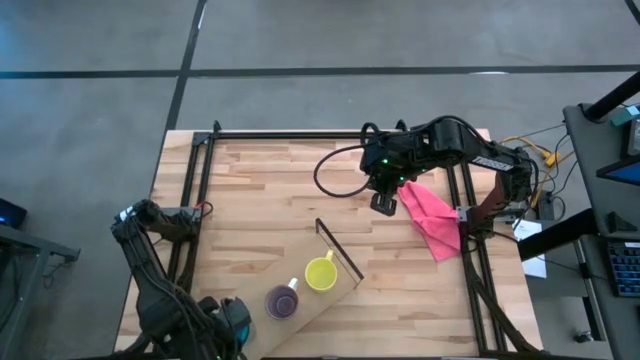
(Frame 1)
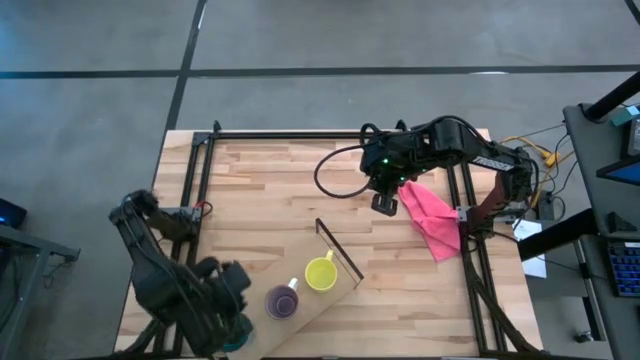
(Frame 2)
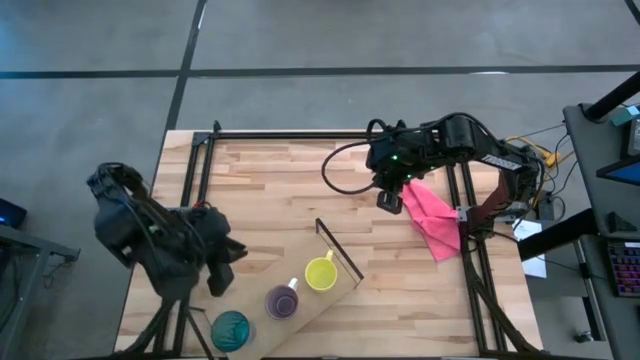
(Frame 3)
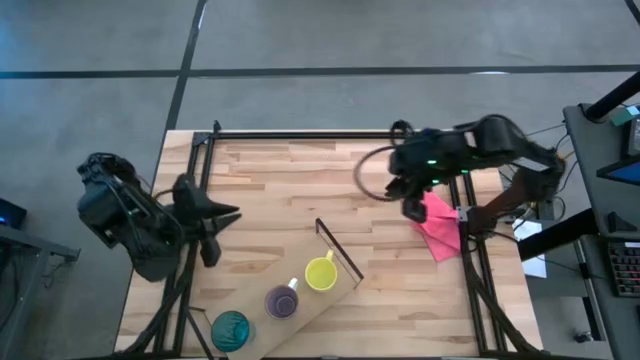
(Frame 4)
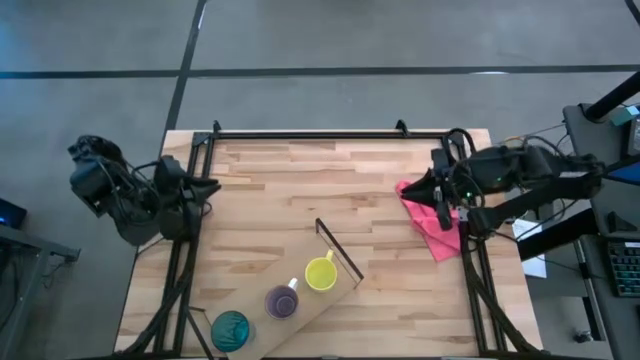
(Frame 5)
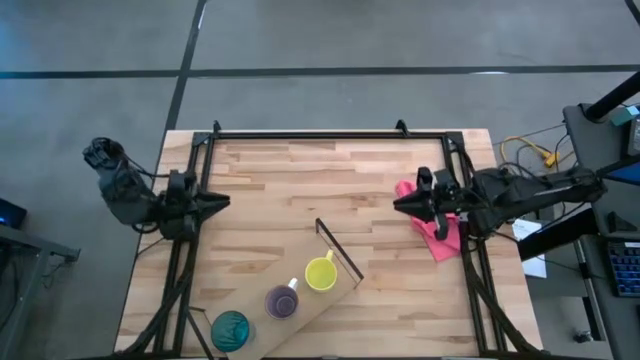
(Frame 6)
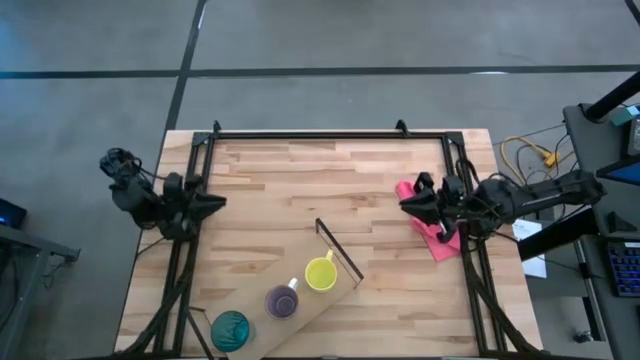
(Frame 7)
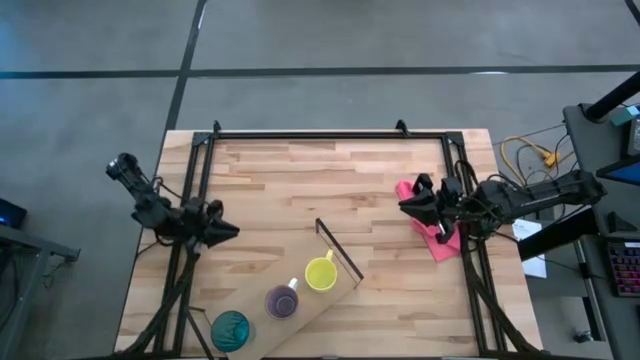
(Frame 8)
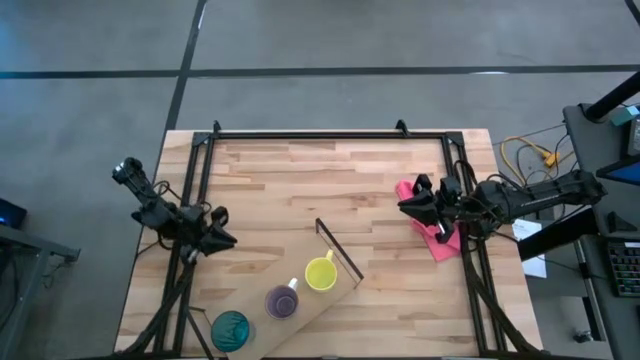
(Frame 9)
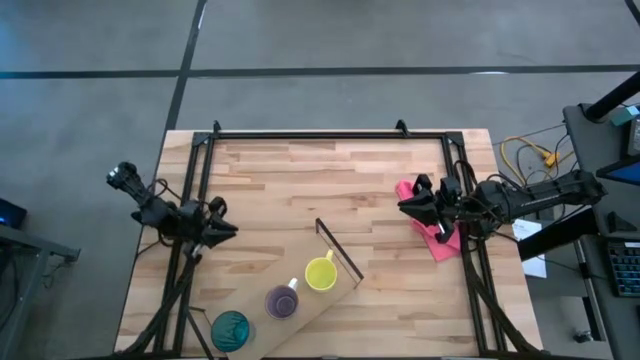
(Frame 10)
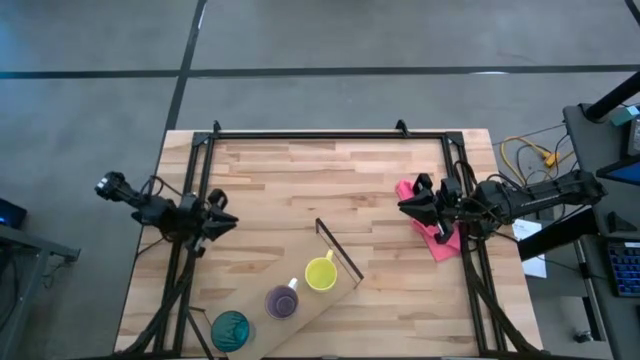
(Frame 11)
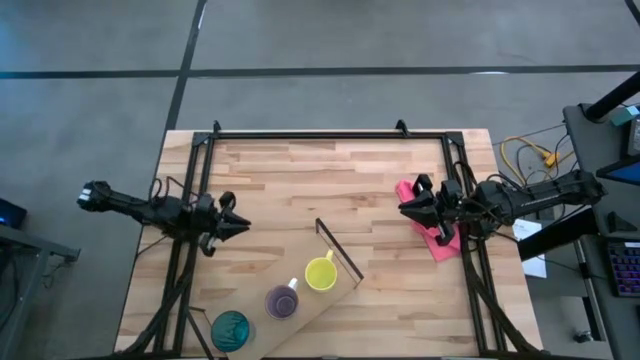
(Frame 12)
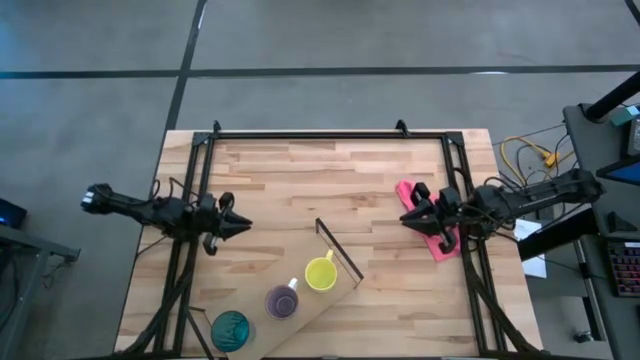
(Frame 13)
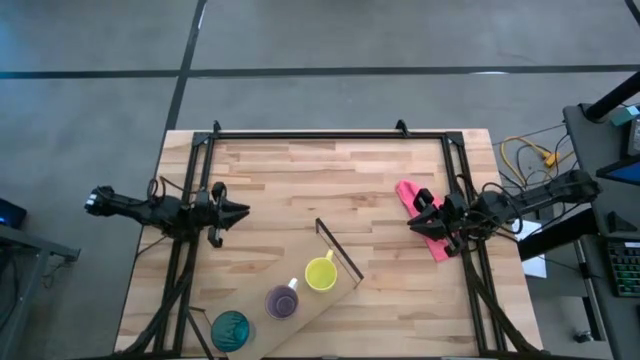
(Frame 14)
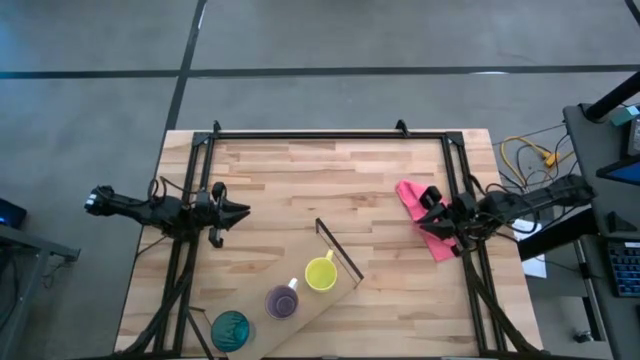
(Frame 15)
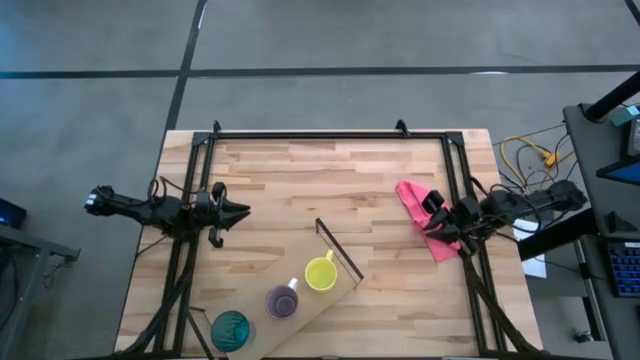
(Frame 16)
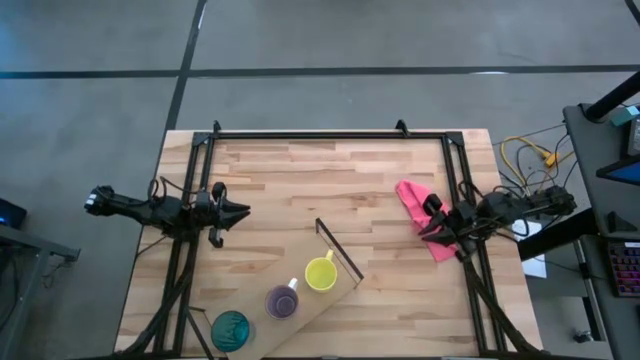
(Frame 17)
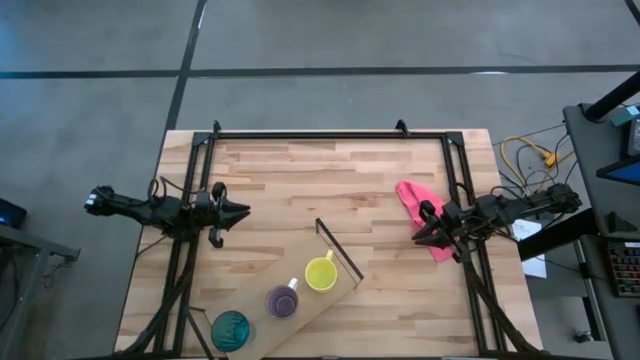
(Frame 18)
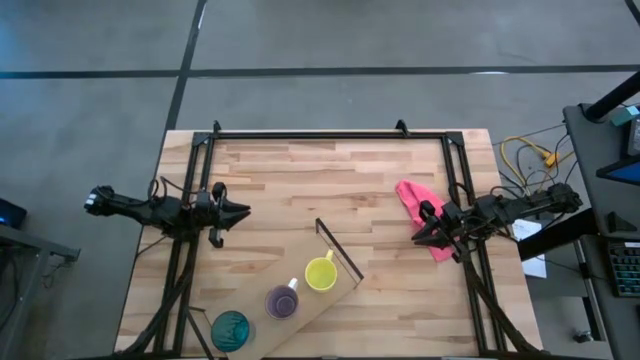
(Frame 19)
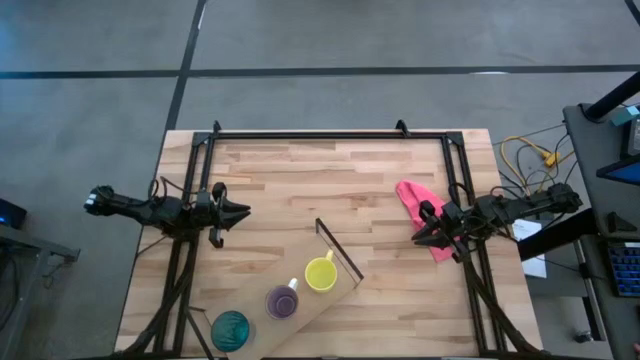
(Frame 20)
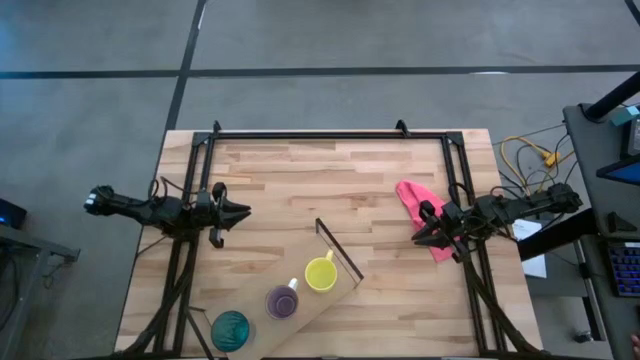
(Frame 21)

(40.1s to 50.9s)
Task: Stack small to large cups/mugs on shelf
Return to Home Position

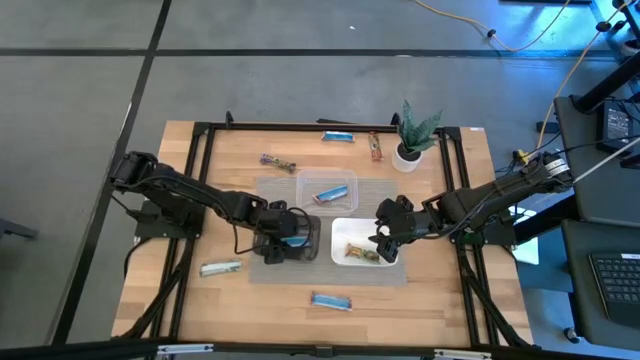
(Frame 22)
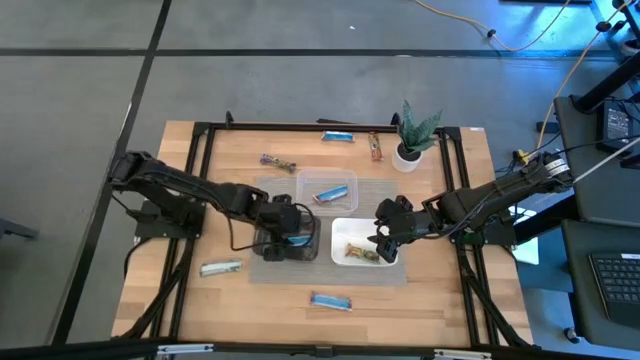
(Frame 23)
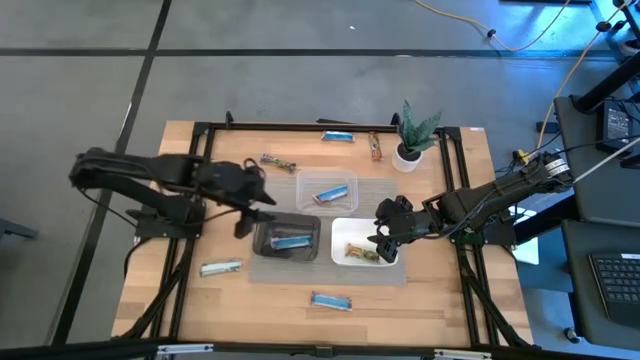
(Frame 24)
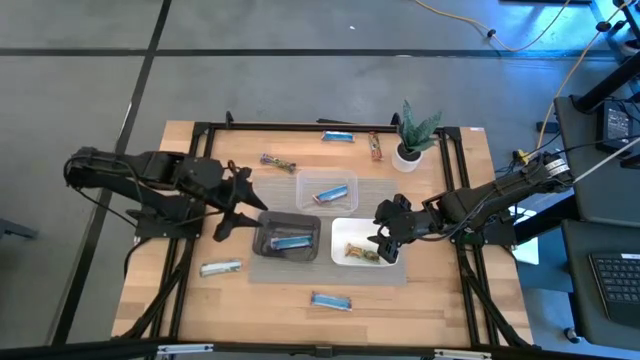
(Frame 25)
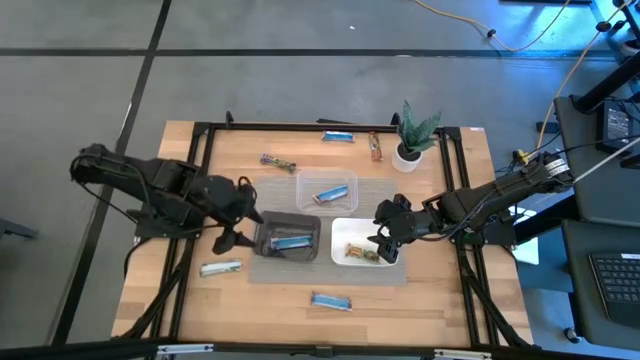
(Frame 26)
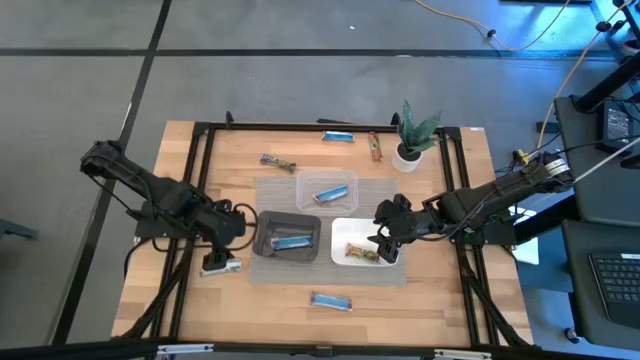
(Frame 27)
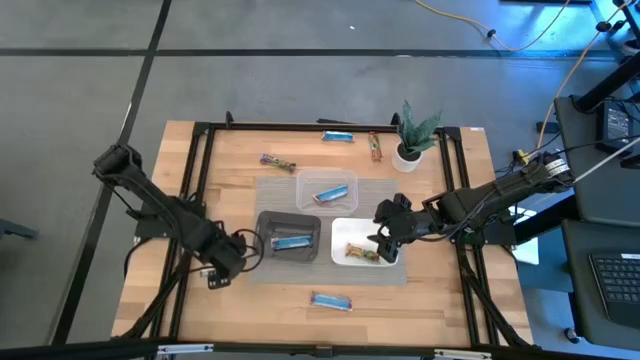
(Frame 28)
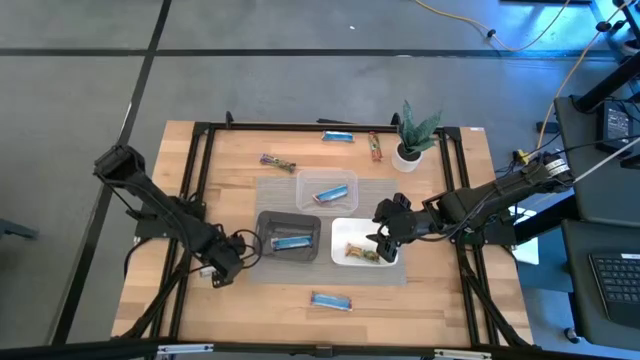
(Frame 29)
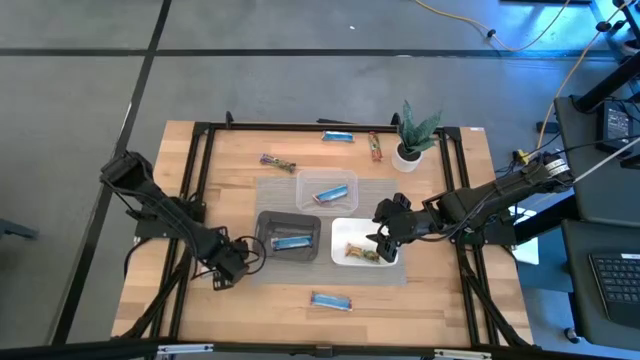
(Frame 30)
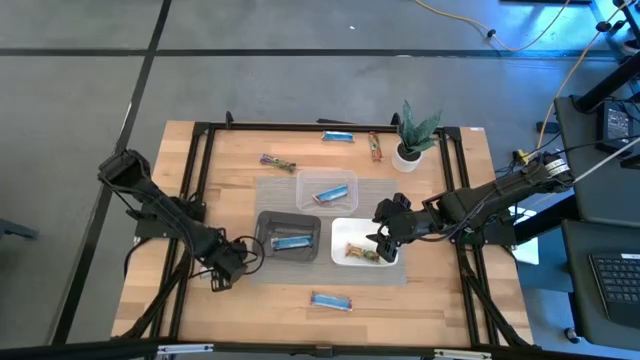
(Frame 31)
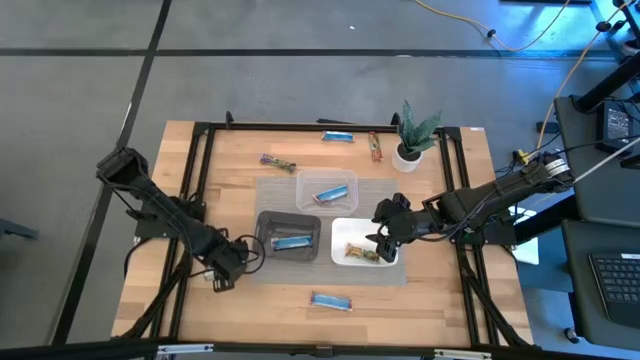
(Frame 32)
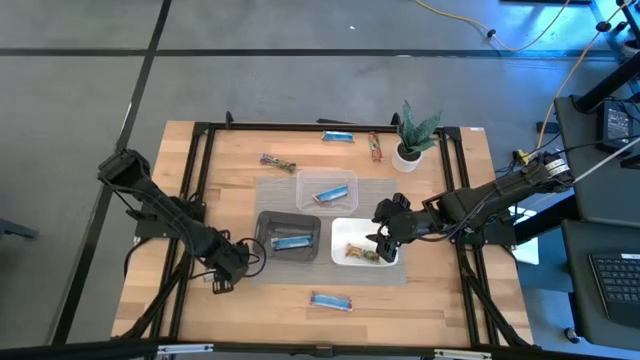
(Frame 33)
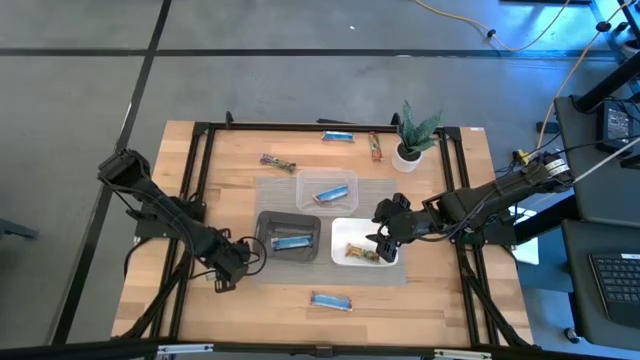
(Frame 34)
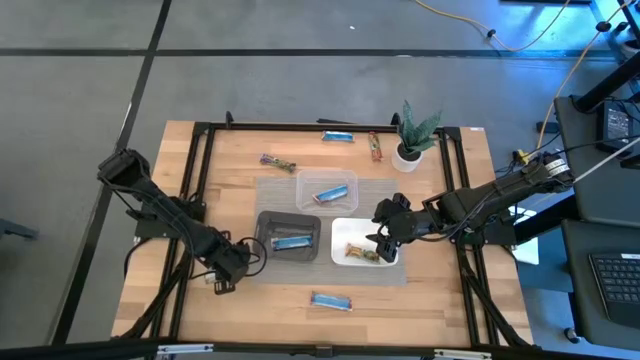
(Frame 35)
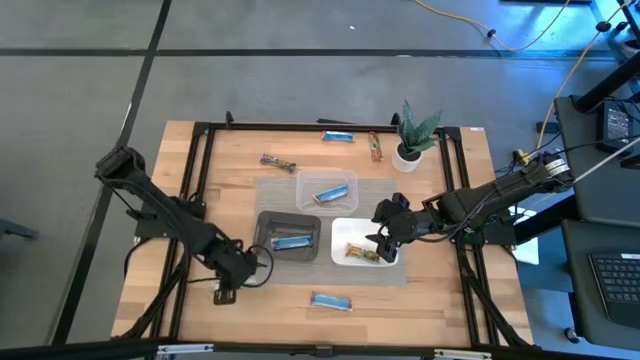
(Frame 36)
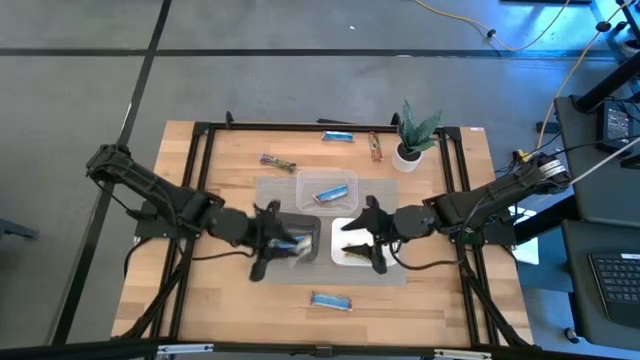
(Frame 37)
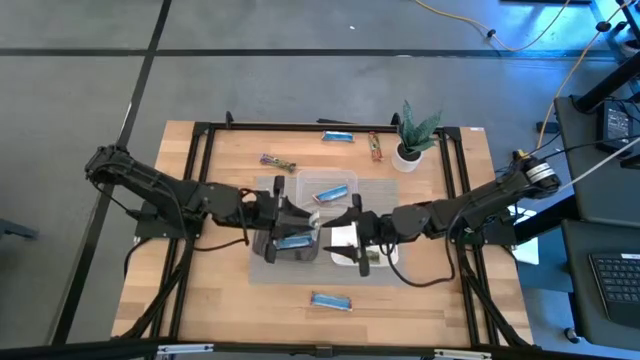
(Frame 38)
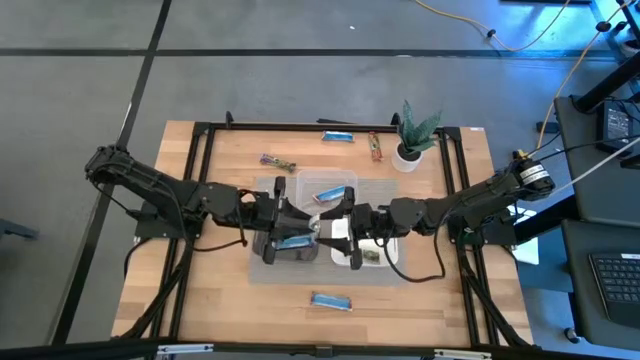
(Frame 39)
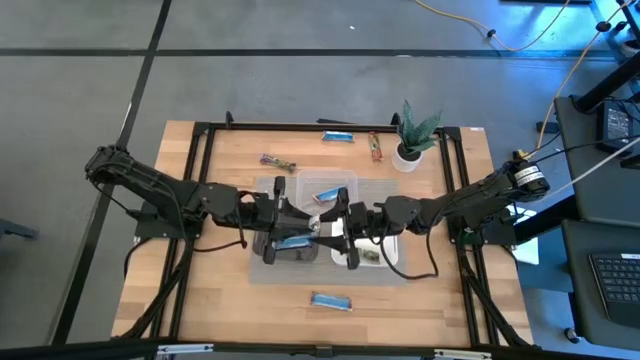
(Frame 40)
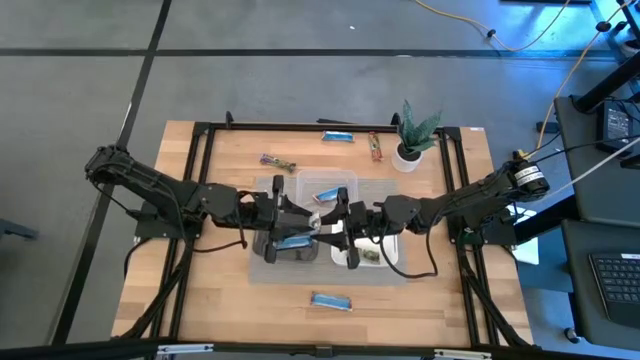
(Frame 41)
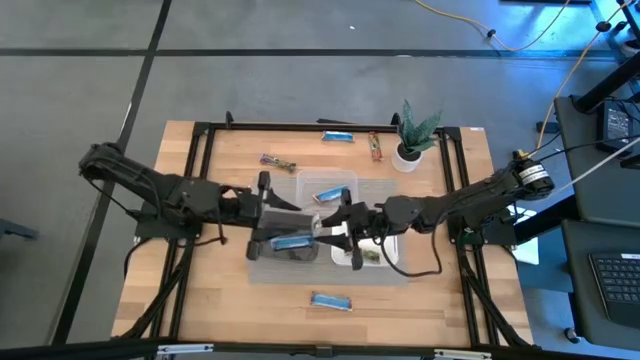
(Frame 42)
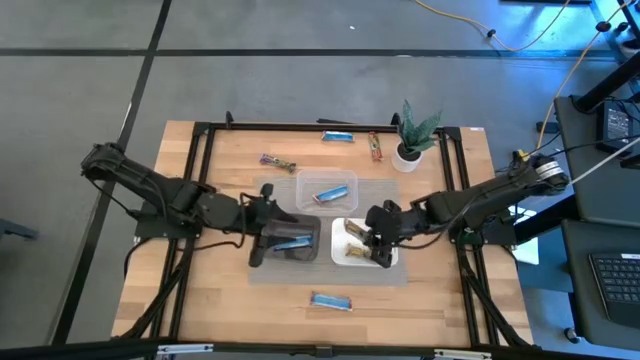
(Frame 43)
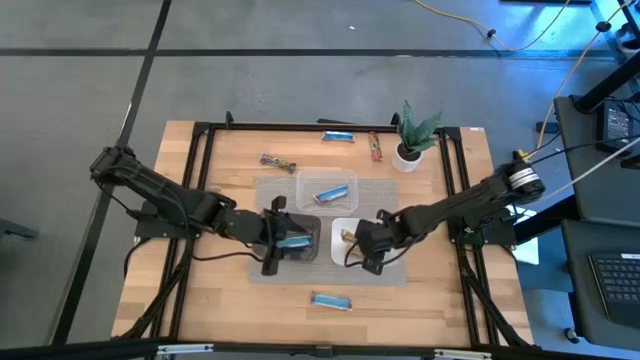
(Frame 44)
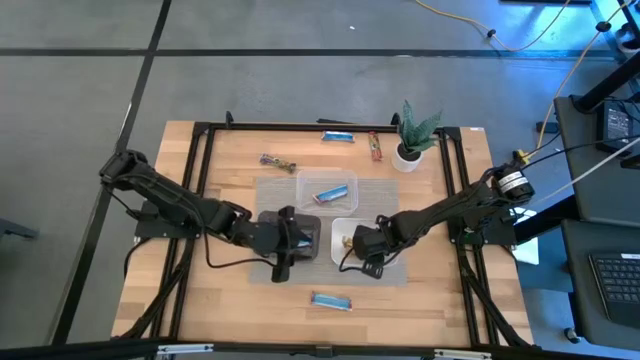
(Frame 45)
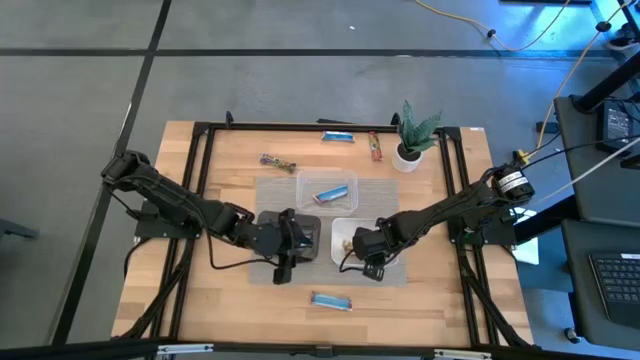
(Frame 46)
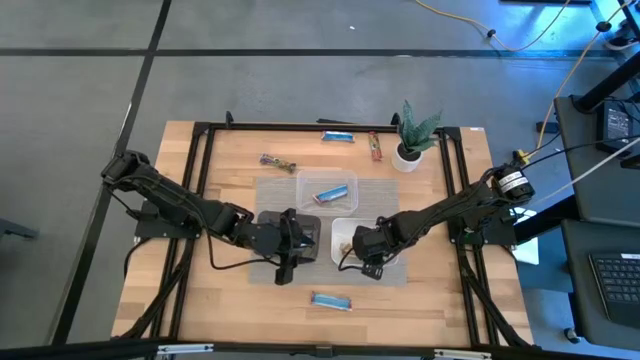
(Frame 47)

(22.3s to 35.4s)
Task: Pick and place Granola Bars by type
Put the bottom yellow granola bar into the white bin
